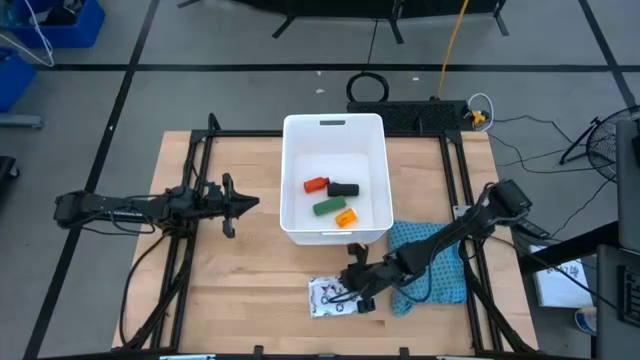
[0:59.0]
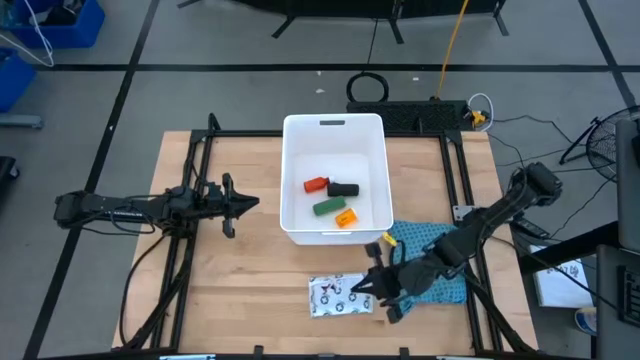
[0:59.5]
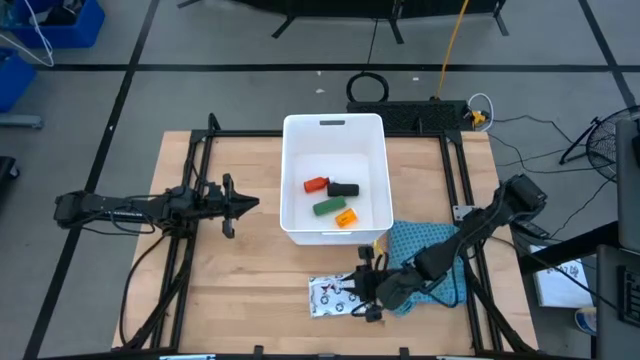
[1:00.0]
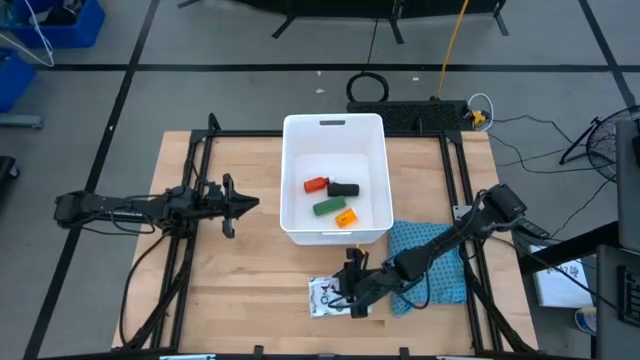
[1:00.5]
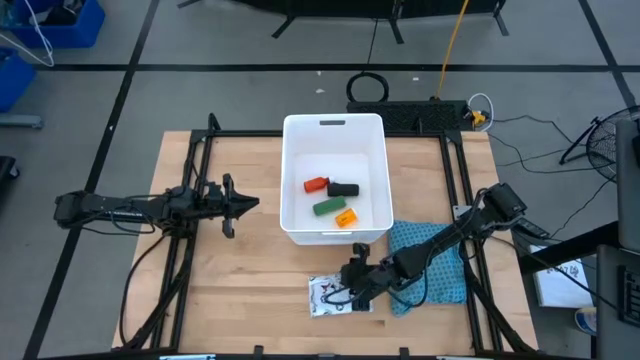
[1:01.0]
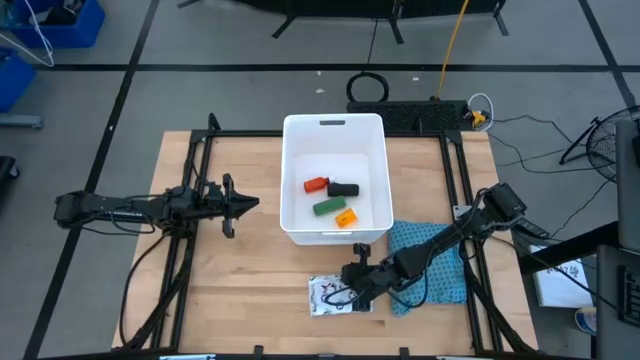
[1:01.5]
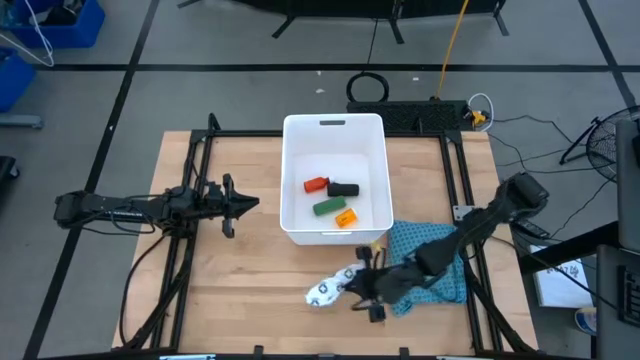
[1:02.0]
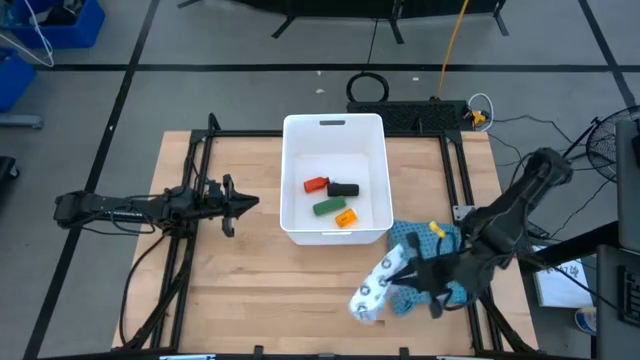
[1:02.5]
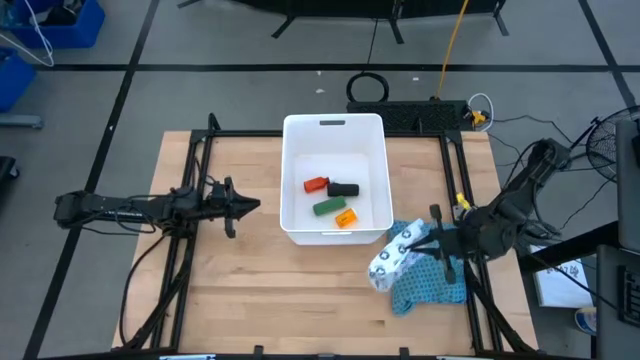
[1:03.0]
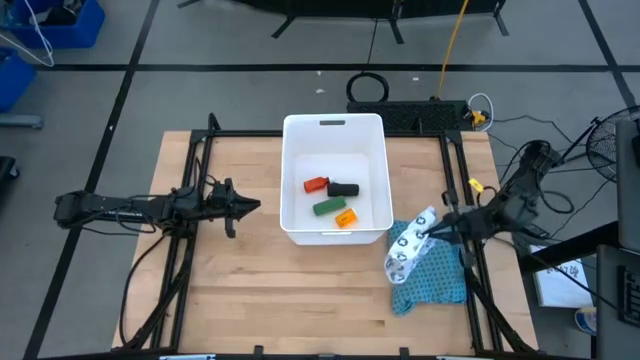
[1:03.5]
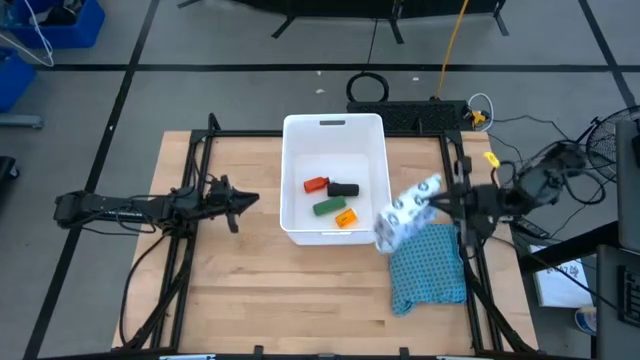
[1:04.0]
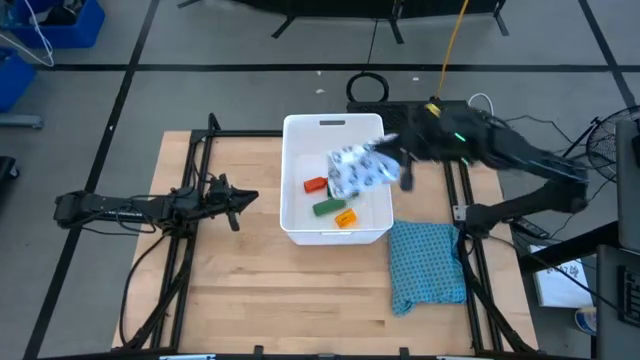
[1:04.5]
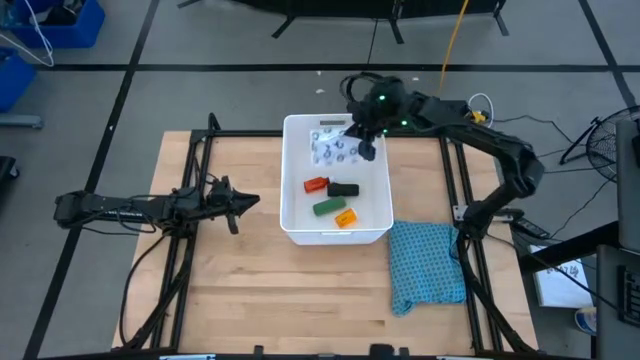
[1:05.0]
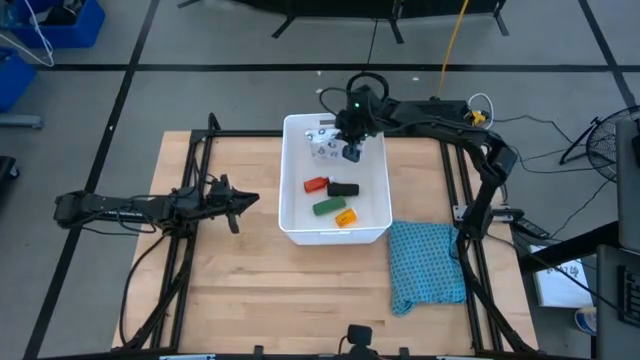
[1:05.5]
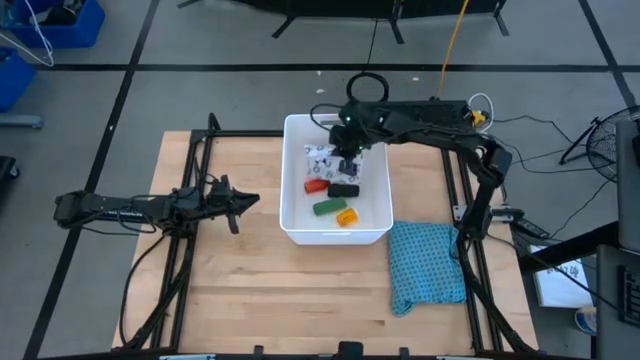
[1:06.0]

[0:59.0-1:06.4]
Task: Pick & place medical supplies in basket/bin
Put the white mailer bag into the white bin

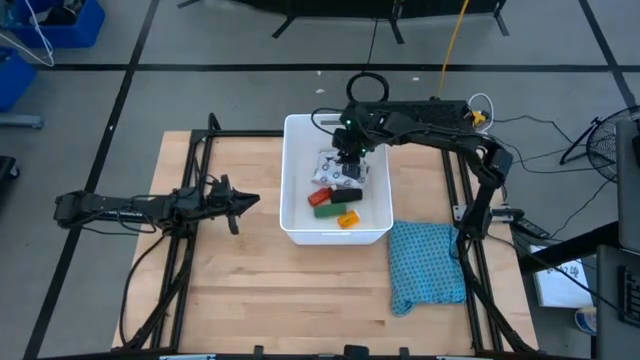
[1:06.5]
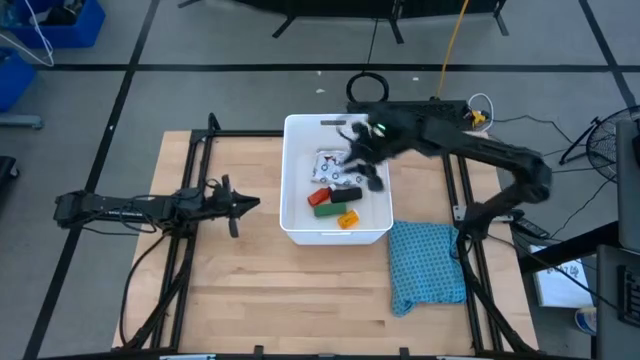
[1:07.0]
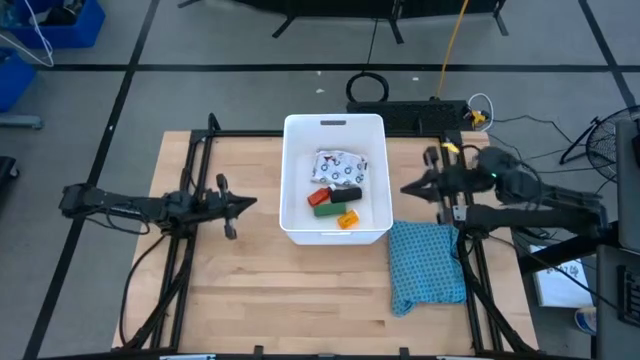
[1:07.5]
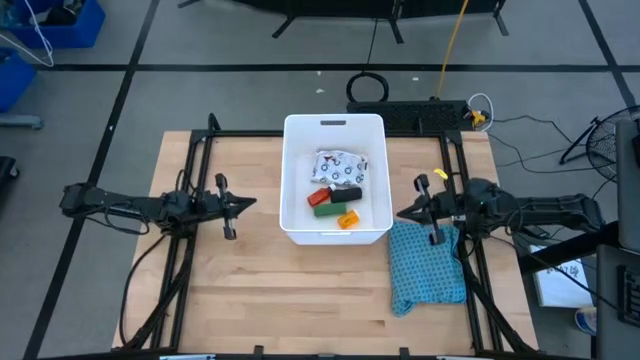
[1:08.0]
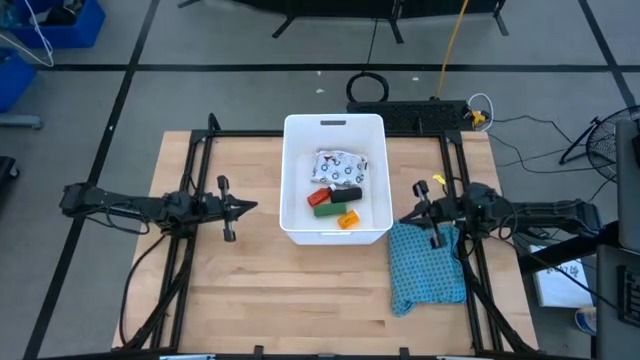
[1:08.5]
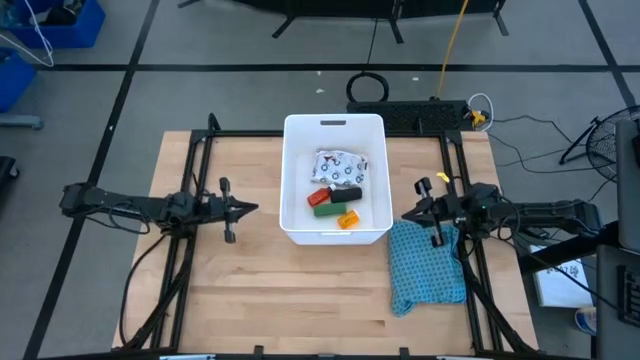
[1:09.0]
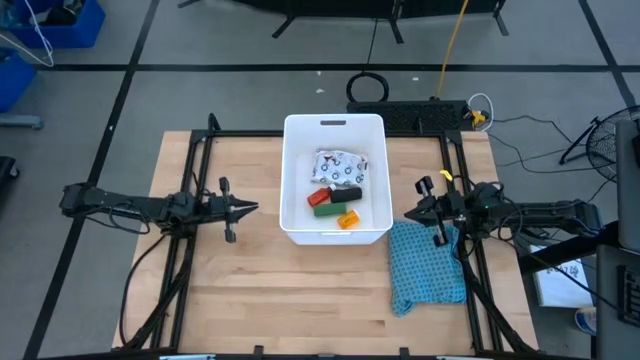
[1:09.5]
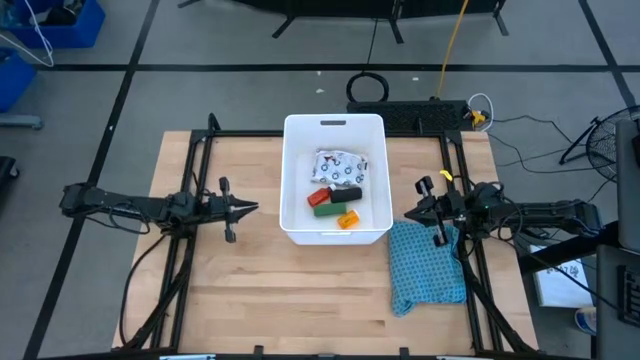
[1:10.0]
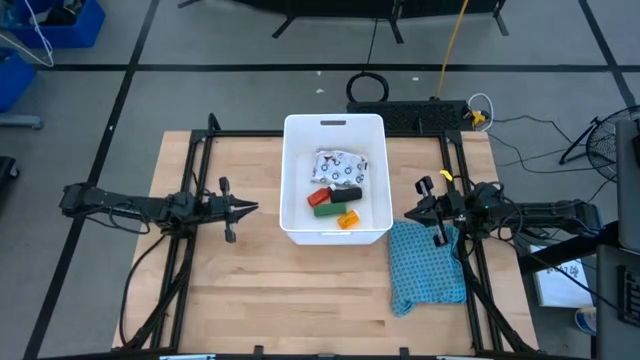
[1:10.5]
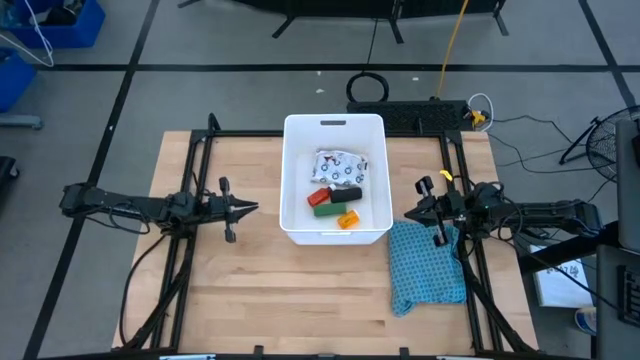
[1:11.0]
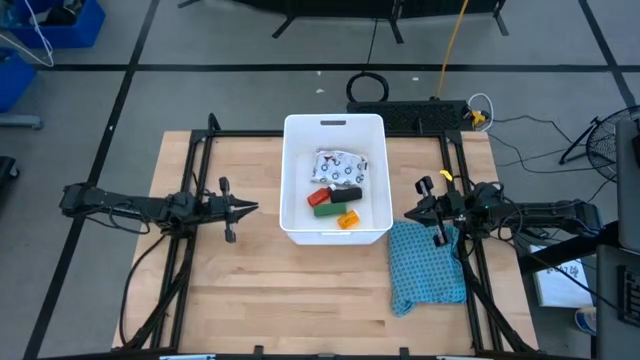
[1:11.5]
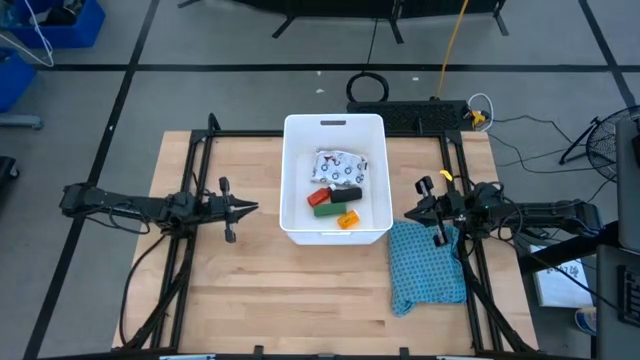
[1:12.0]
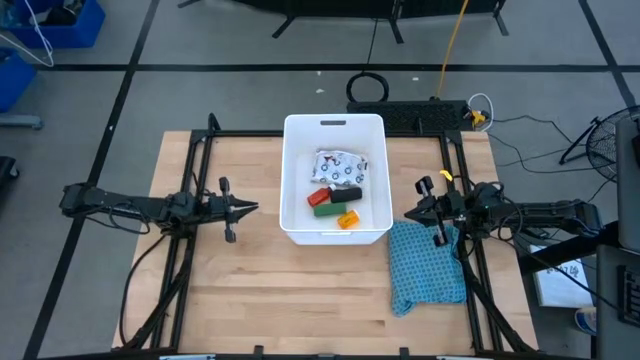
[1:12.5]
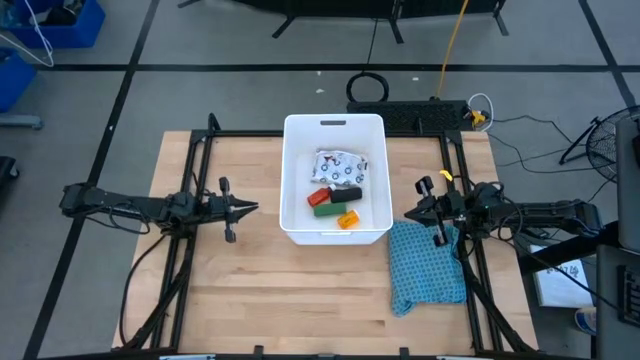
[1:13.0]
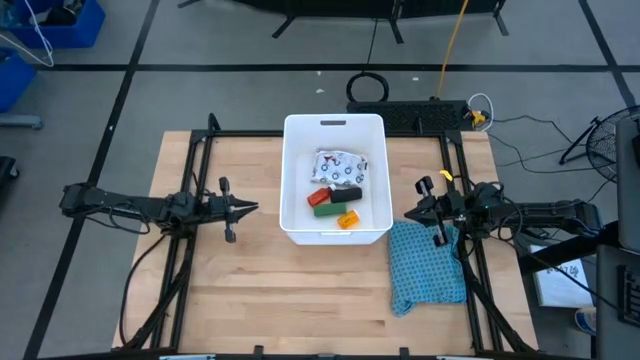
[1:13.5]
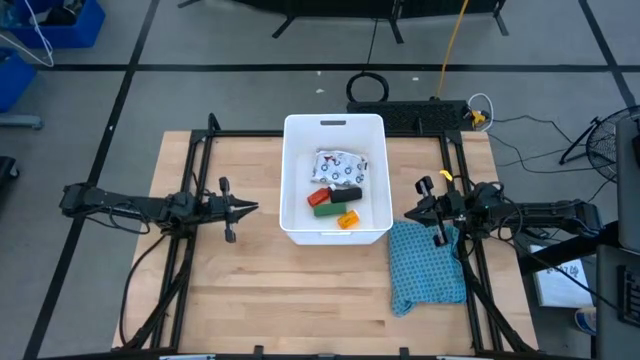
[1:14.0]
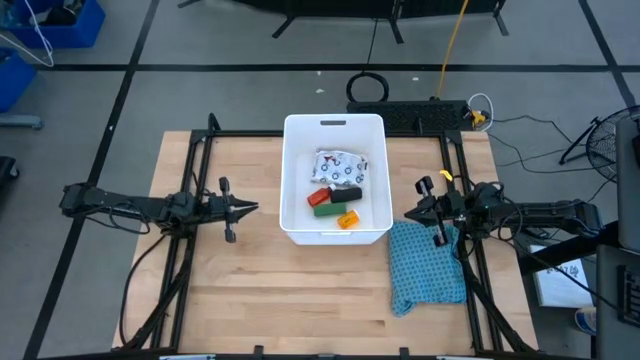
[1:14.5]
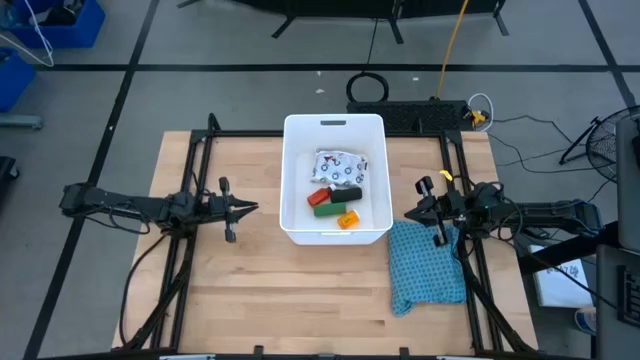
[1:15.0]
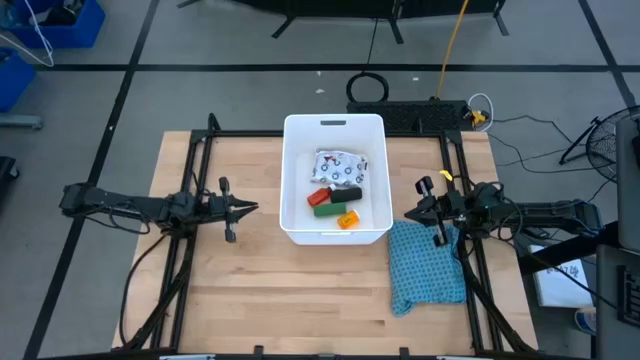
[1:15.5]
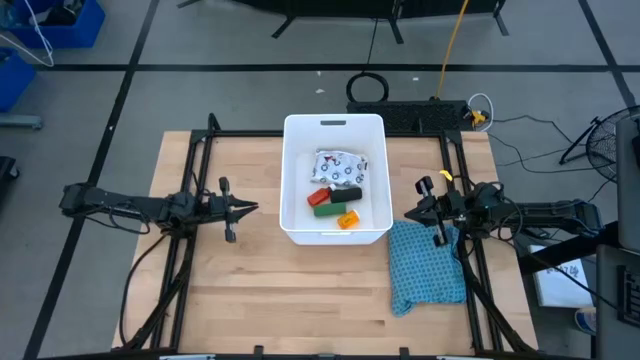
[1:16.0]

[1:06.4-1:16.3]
Return to Home Position

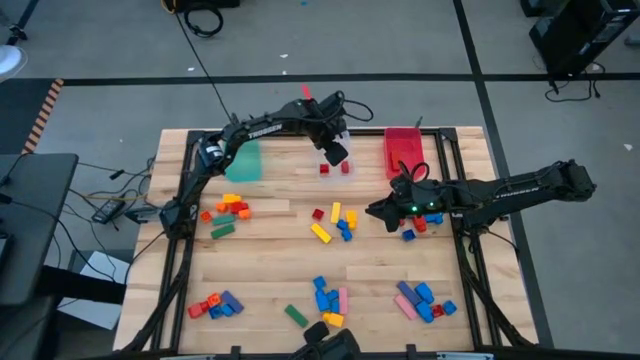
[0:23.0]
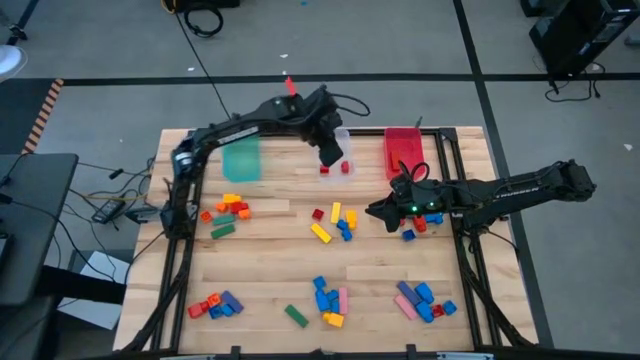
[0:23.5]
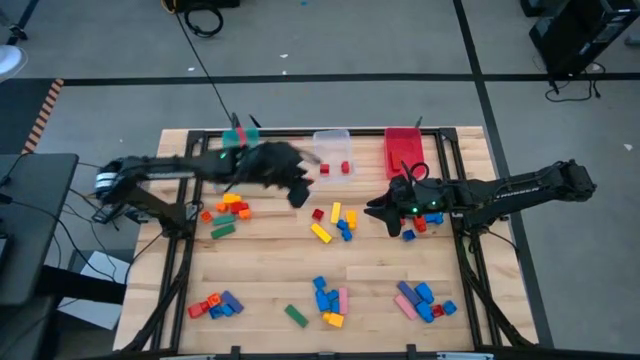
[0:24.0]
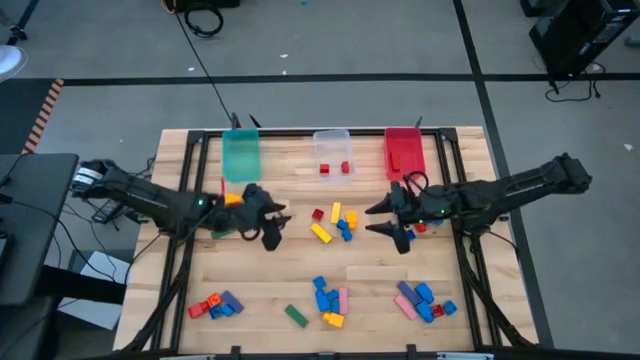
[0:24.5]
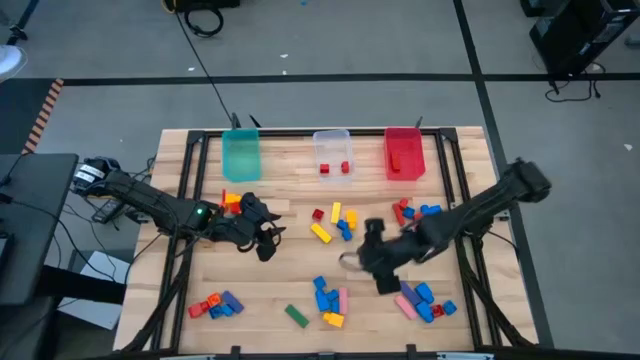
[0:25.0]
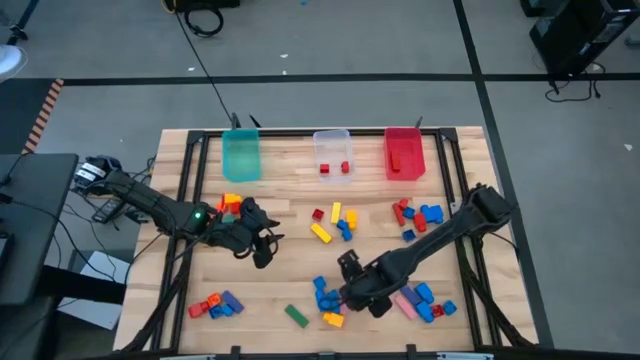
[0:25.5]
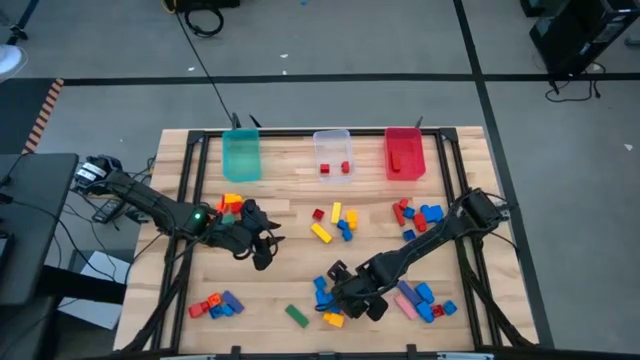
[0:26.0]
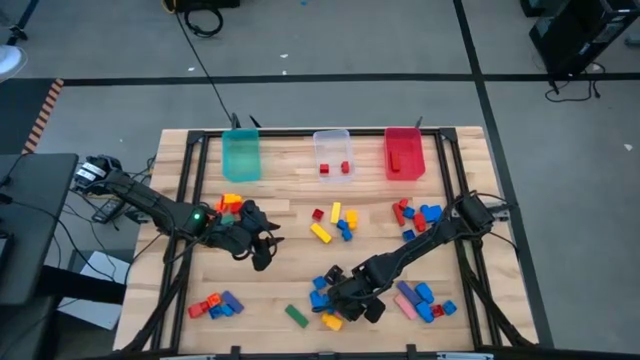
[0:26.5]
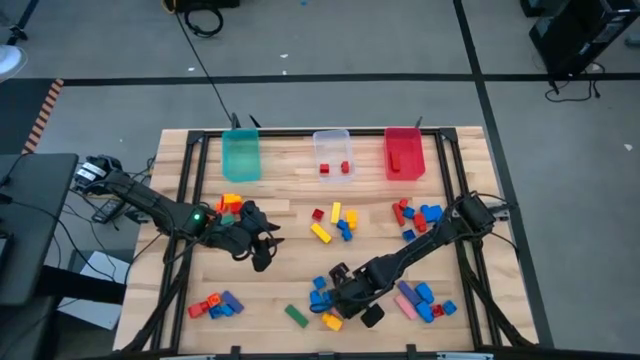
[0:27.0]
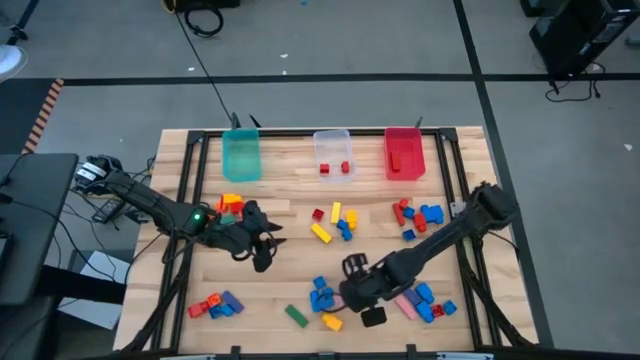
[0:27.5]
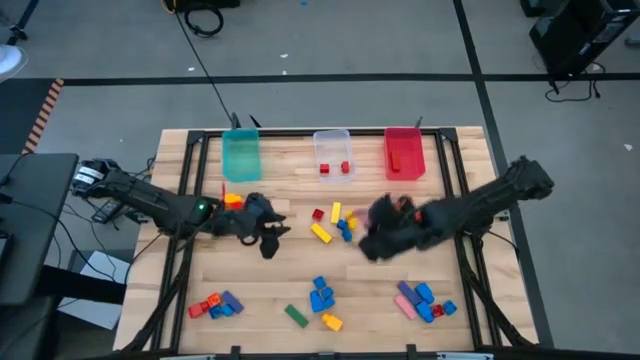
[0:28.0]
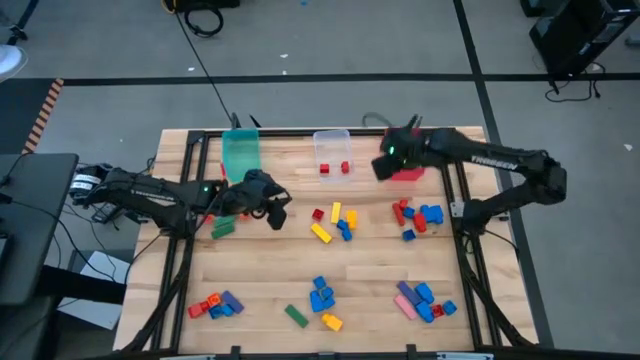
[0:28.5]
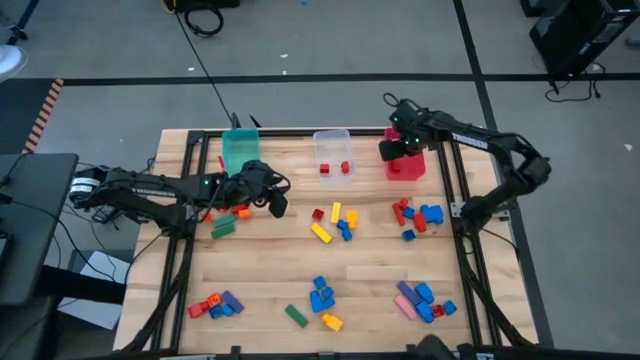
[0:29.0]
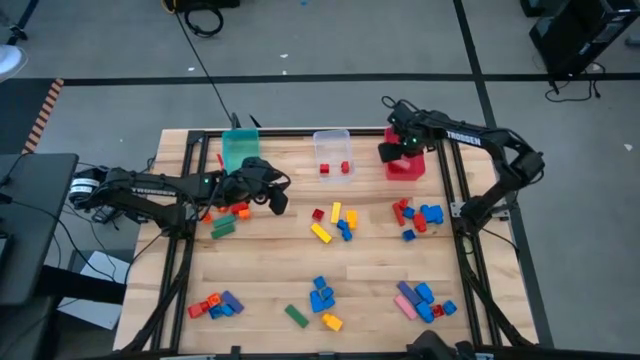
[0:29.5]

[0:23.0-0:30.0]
Task: Sort blocks by size
Put the pink block into the red bin
